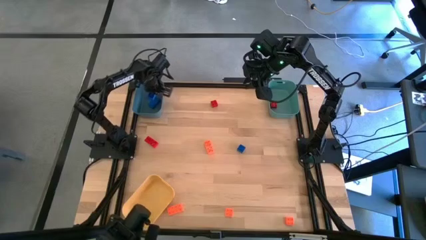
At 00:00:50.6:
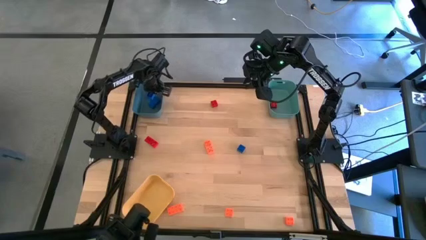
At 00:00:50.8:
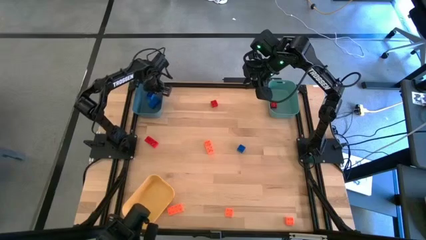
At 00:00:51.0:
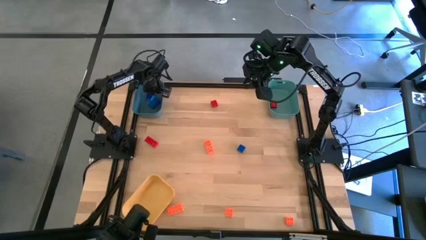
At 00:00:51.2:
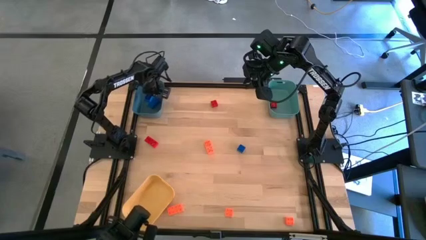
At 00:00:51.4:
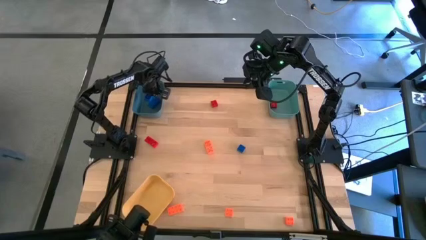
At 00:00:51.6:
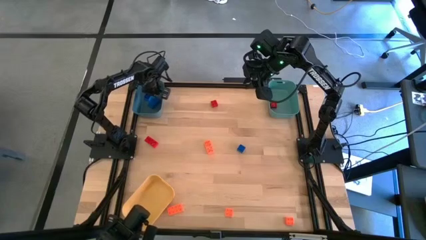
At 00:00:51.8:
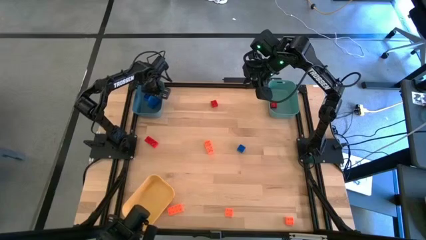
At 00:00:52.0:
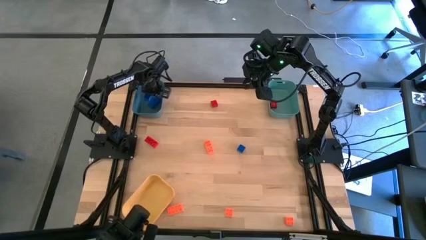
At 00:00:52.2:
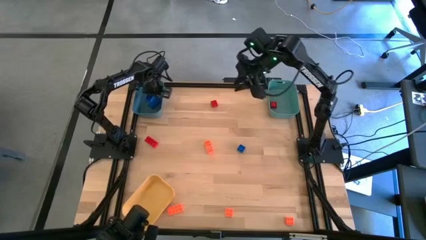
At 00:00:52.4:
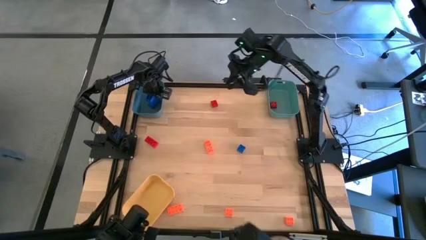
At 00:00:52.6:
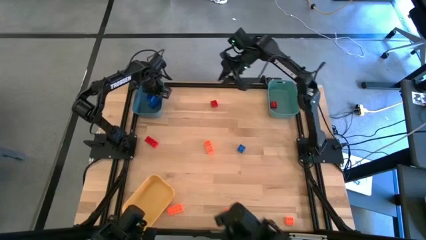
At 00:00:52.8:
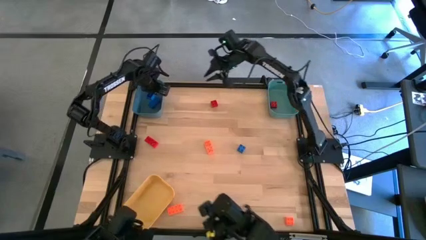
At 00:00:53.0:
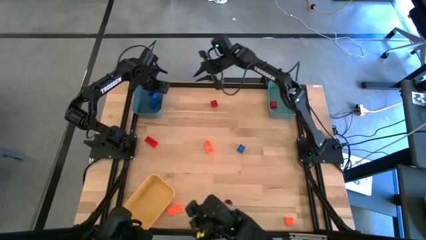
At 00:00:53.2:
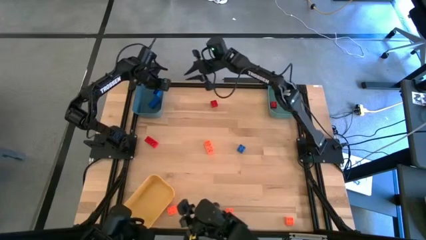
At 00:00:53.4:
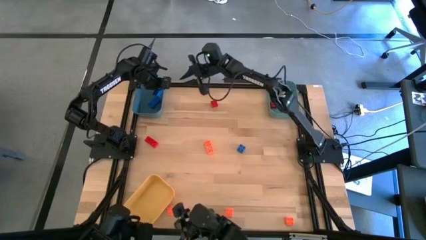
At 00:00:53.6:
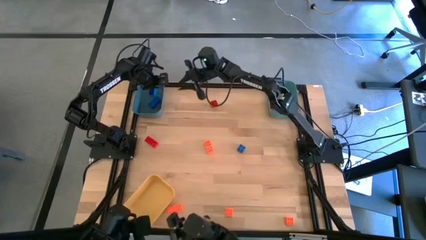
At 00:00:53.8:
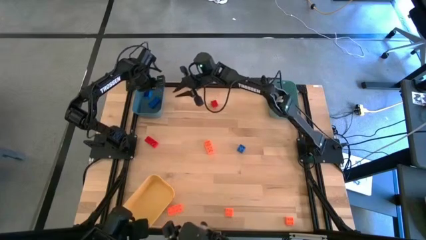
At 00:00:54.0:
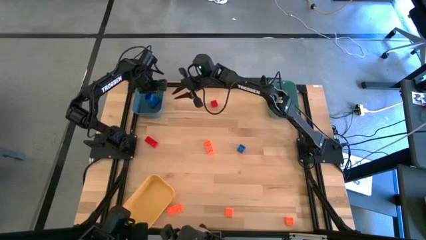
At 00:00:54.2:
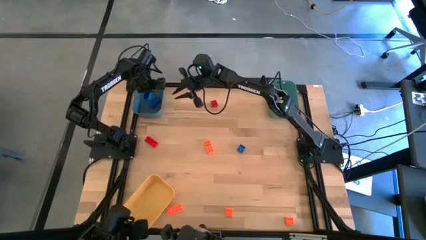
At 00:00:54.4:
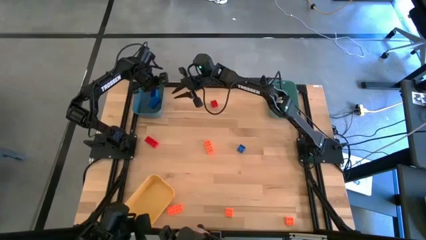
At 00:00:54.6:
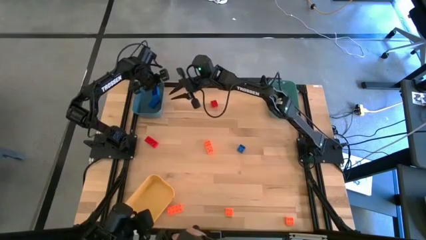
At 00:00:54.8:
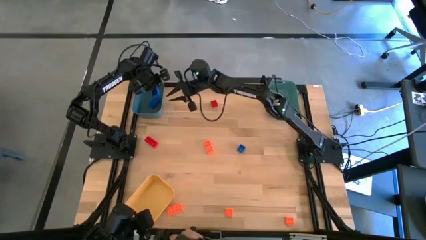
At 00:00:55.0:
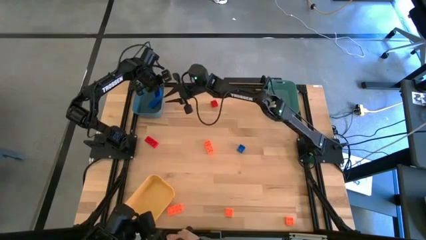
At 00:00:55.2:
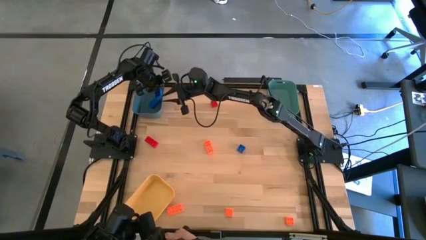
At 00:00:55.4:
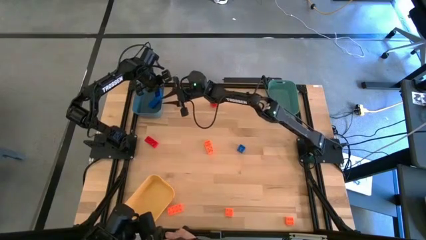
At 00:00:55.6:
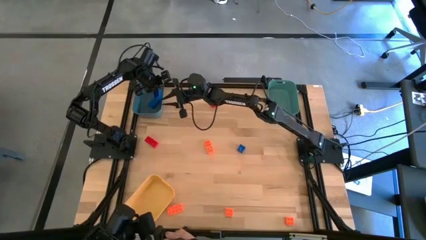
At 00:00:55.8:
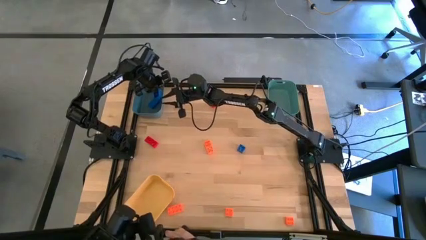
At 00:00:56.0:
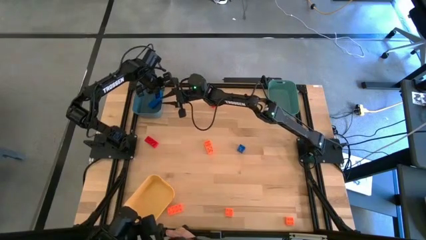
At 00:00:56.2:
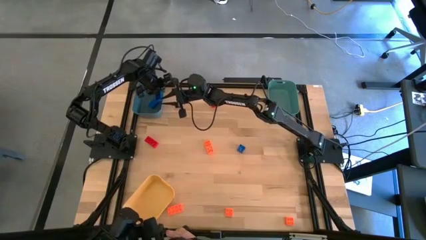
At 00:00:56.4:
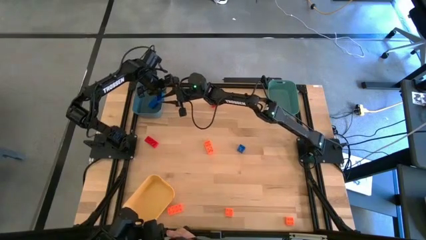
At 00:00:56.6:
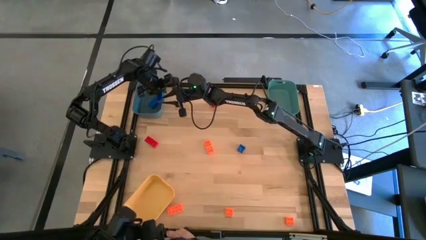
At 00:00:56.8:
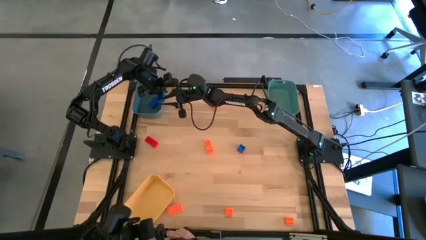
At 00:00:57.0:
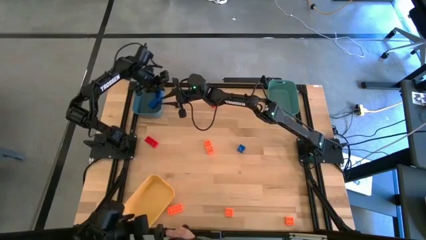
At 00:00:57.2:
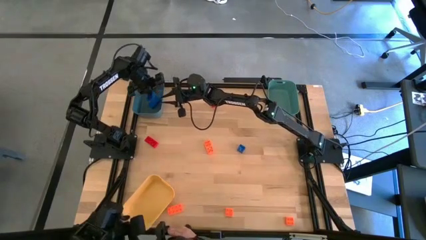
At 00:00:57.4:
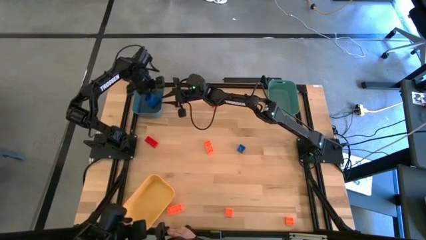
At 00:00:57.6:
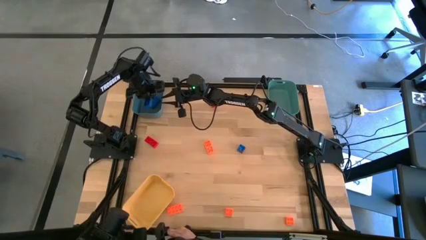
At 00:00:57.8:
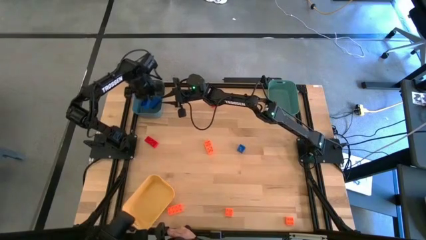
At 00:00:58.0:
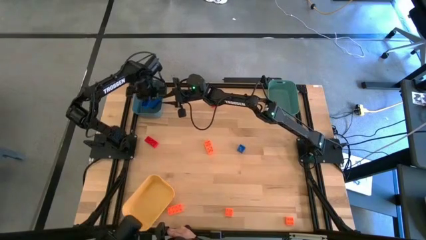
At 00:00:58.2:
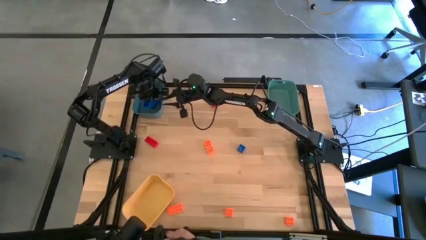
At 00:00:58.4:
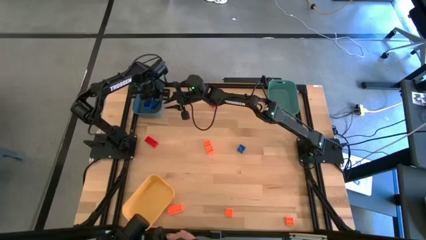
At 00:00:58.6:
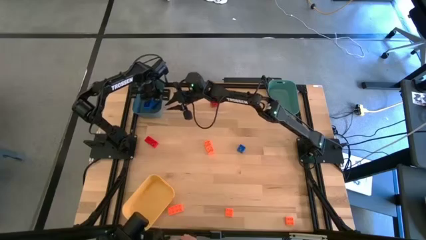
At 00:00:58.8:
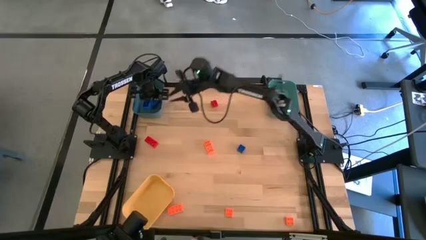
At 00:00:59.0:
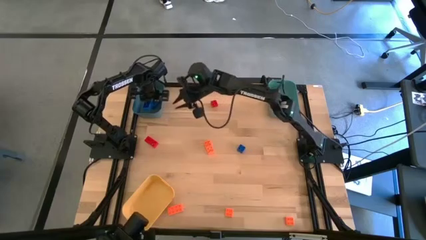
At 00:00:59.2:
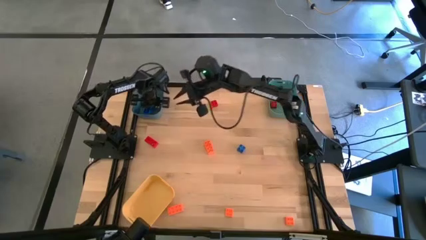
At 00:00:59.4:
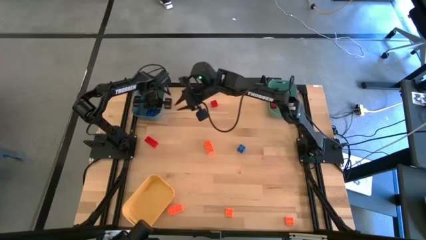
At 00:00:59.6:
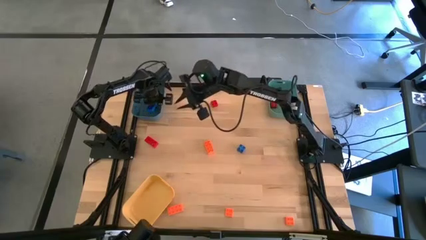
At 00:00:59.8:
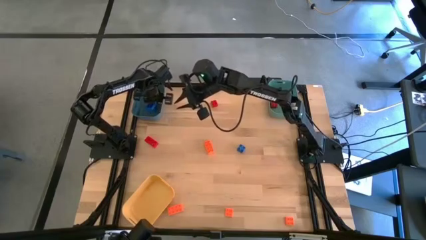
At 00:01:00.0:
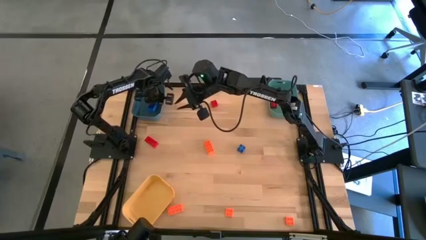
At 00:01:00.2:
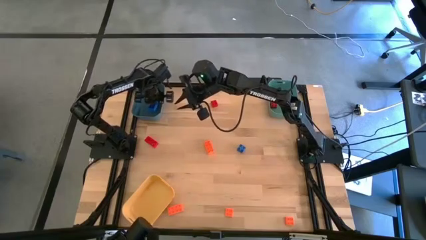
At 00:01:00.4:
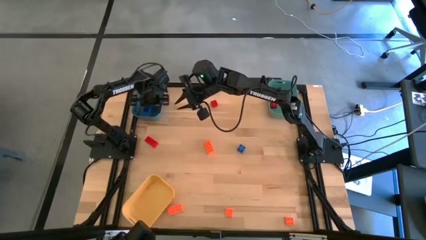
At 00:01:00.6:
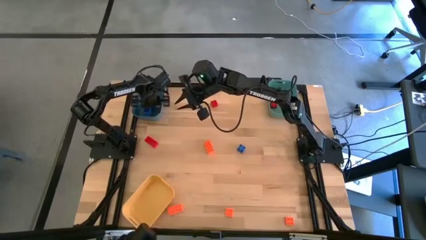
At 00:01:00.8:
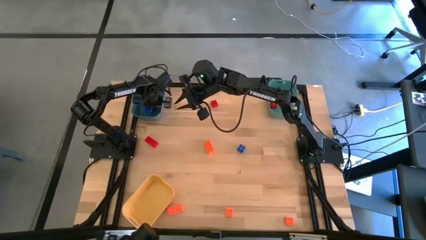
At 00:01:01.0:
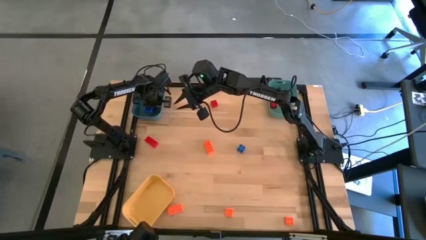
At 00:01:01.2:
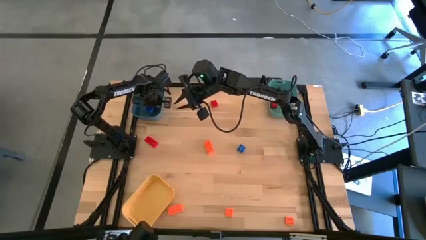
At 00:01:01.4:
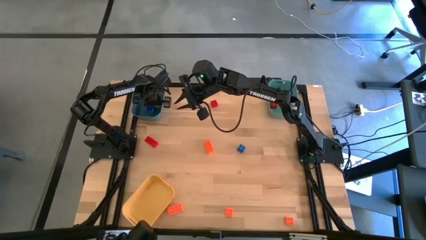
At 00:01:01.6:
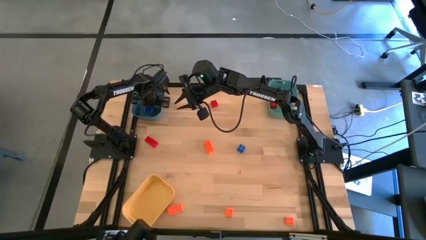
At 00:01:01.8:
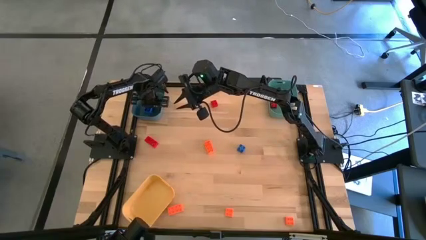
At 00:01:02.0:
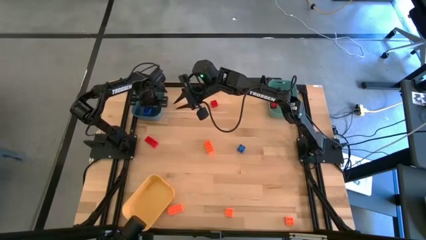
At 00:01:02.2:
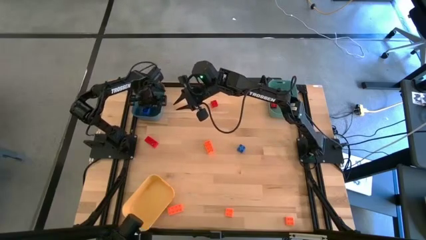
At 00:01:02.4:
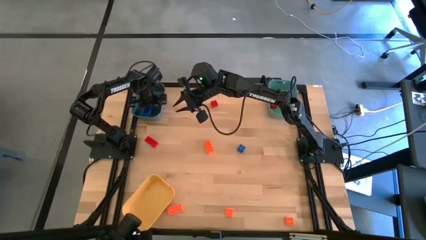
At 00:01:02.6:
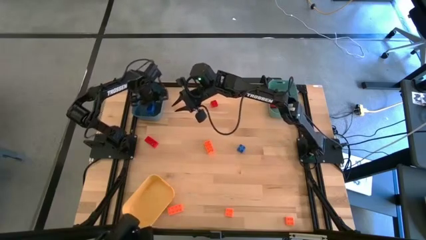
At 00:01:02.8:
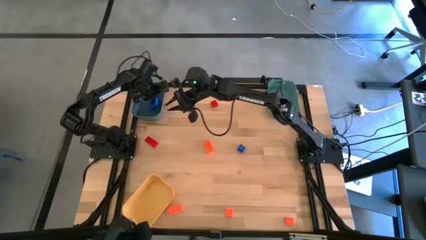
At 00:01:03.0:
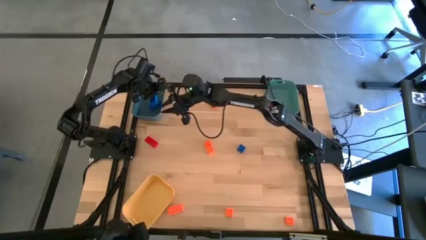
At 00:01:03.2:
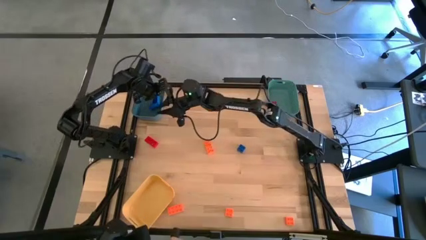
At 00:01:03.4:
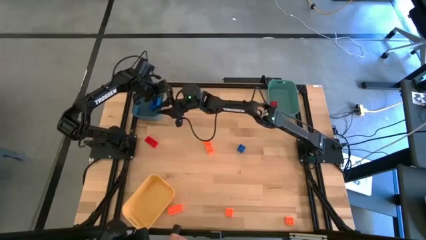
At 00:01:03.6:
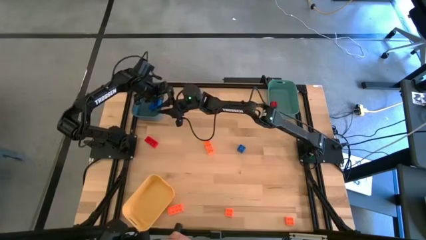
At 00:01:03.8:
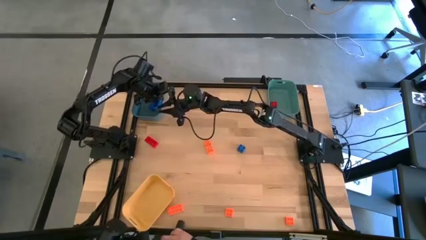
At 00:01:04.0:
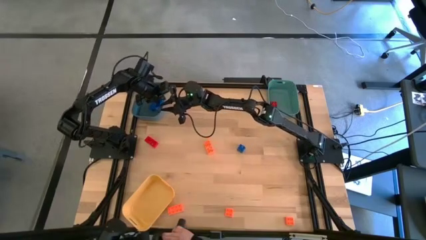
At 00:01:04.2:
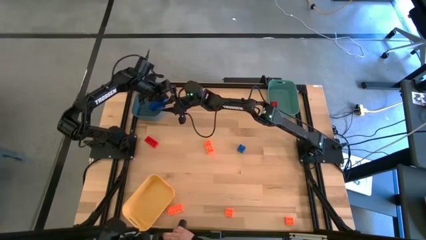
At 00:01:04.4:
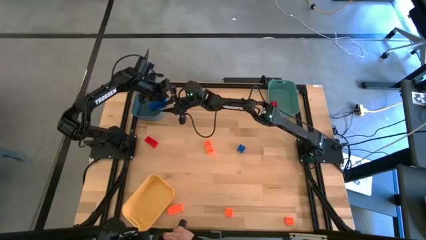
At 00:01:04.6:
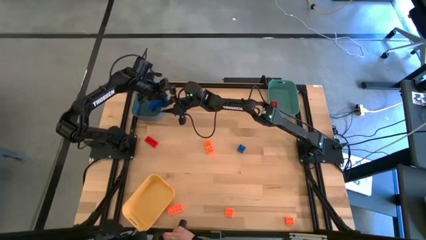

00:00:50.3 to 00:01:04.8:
Task: Sort & place blocks by color
Put the top blue game piece into the blue bin
